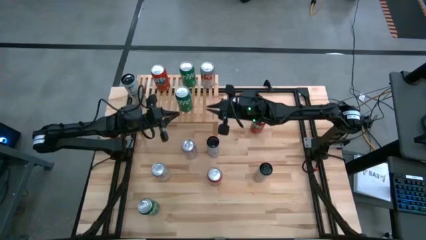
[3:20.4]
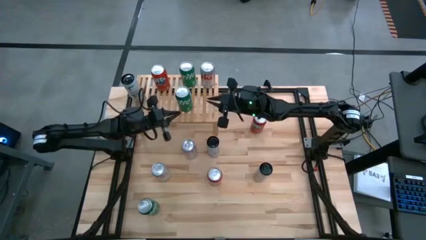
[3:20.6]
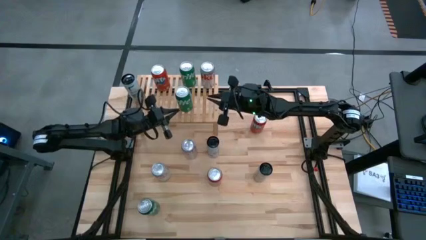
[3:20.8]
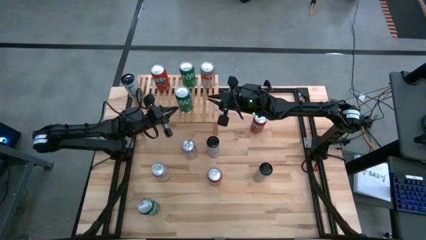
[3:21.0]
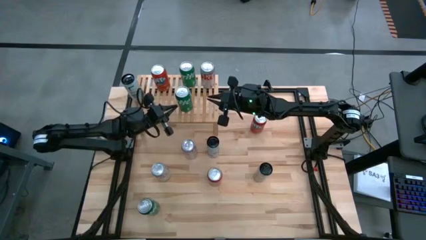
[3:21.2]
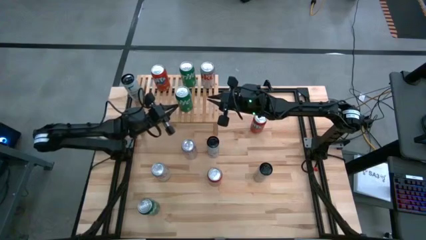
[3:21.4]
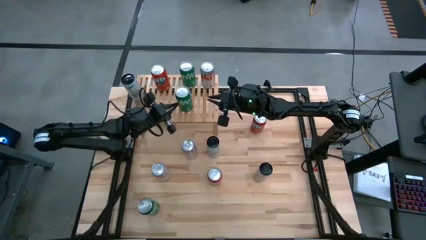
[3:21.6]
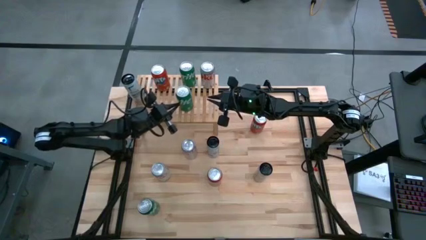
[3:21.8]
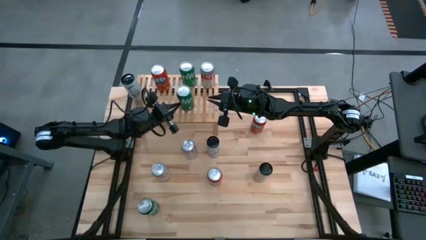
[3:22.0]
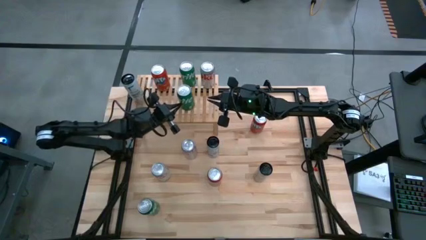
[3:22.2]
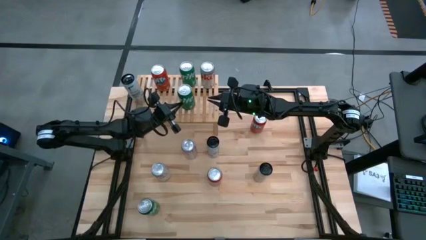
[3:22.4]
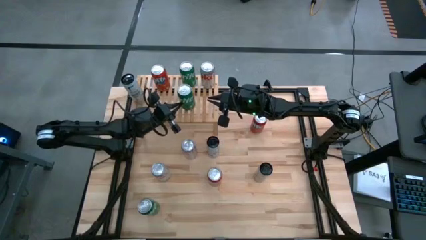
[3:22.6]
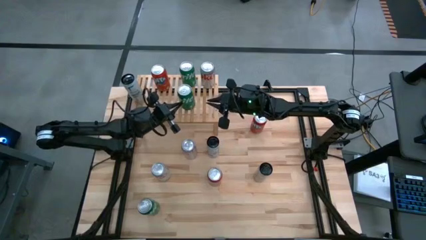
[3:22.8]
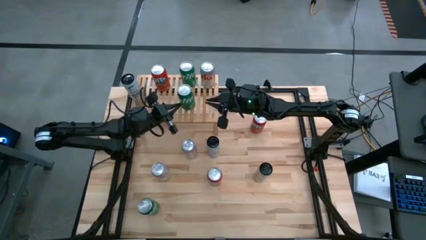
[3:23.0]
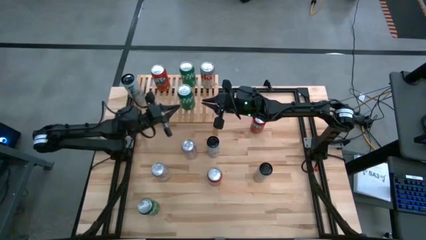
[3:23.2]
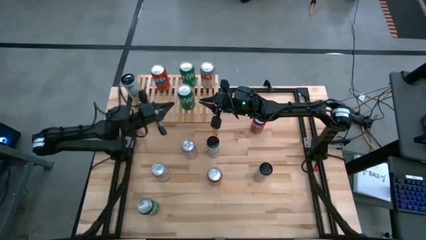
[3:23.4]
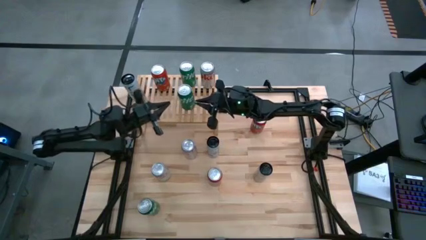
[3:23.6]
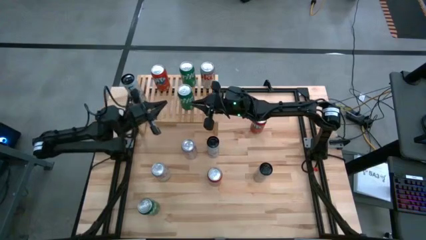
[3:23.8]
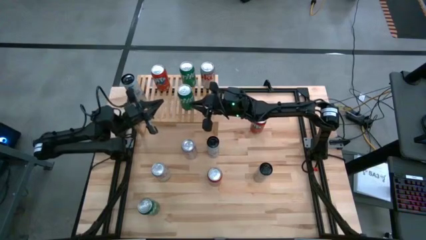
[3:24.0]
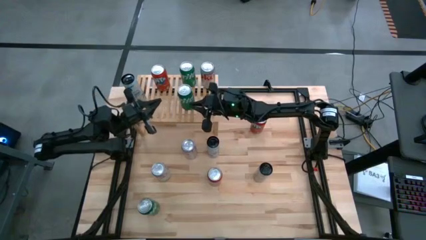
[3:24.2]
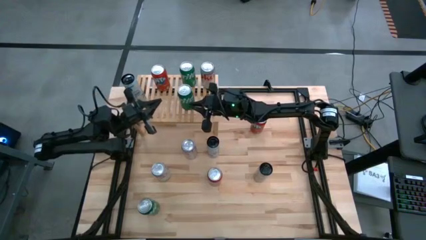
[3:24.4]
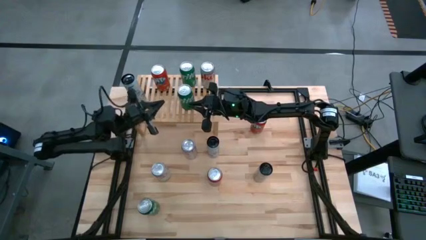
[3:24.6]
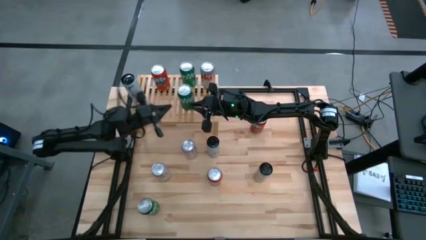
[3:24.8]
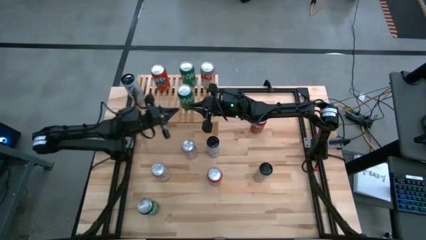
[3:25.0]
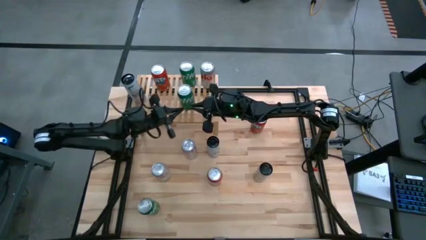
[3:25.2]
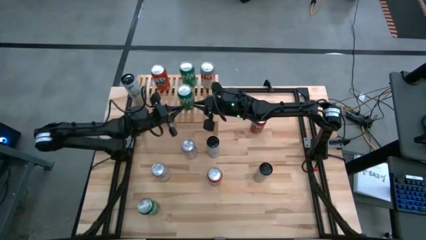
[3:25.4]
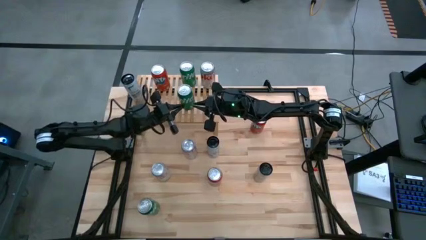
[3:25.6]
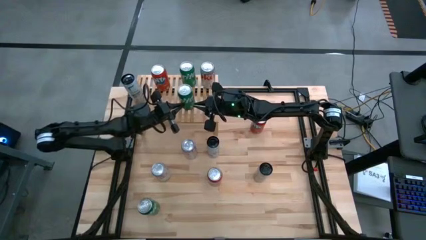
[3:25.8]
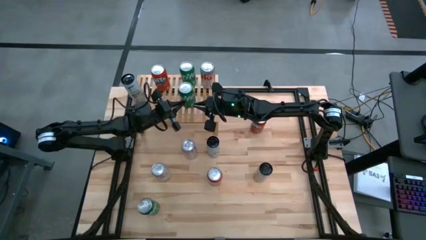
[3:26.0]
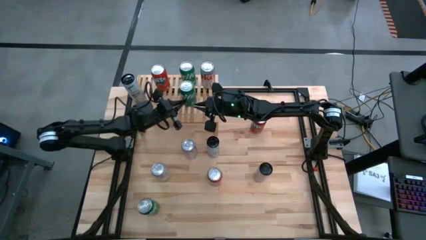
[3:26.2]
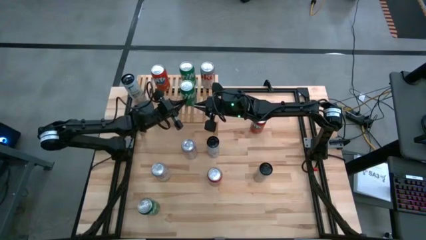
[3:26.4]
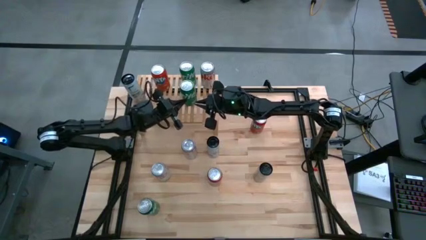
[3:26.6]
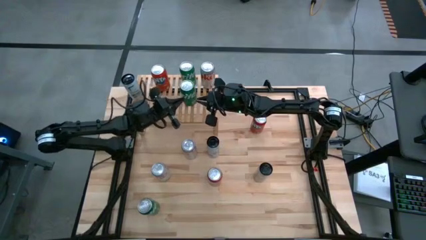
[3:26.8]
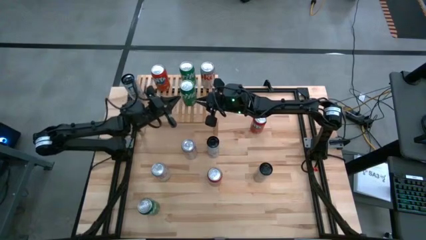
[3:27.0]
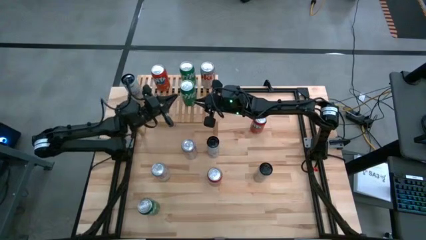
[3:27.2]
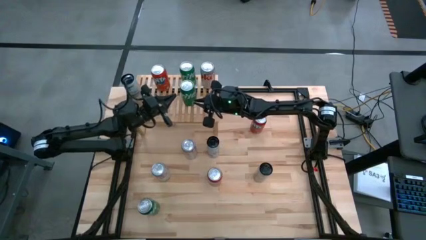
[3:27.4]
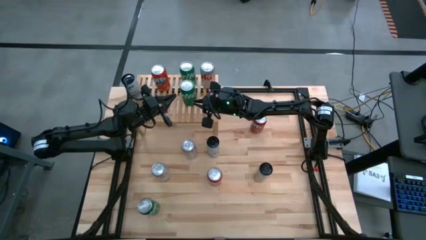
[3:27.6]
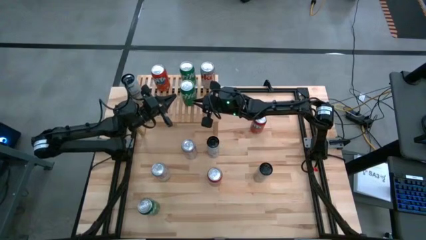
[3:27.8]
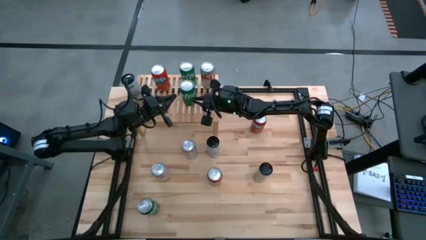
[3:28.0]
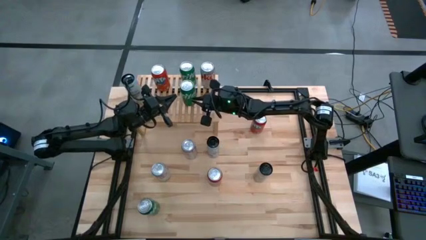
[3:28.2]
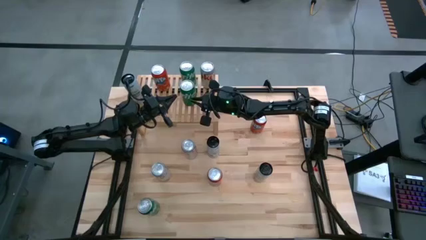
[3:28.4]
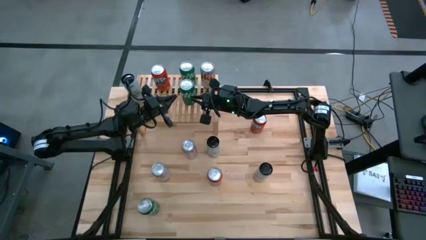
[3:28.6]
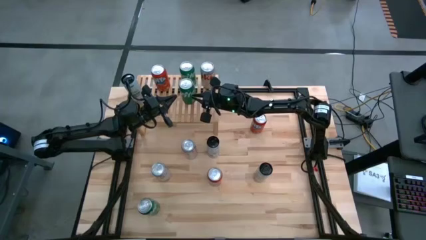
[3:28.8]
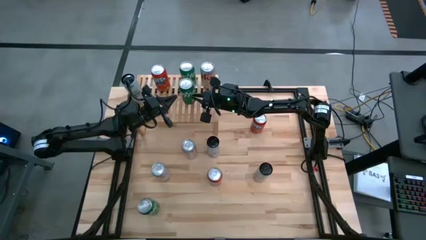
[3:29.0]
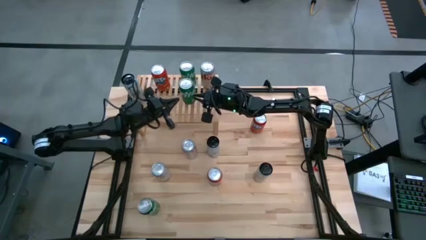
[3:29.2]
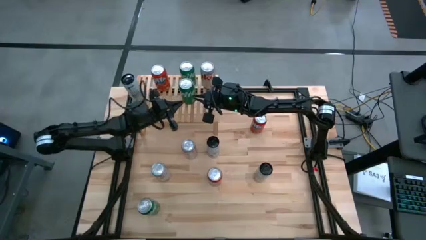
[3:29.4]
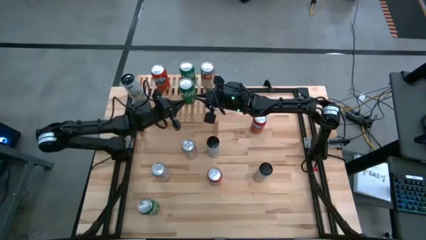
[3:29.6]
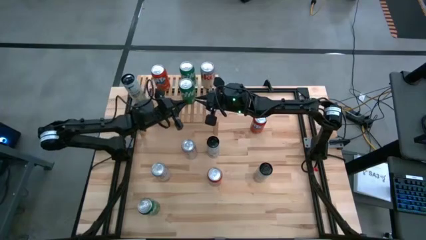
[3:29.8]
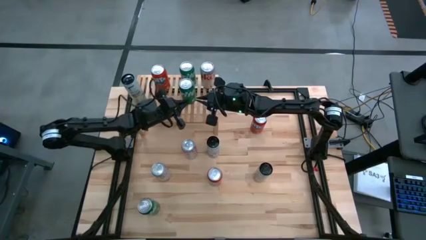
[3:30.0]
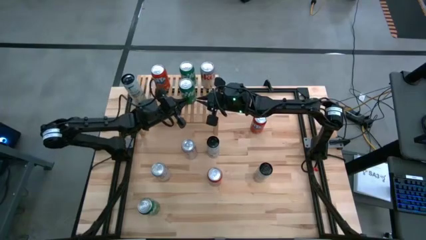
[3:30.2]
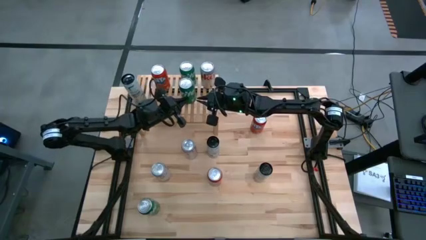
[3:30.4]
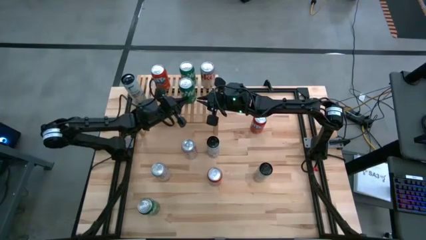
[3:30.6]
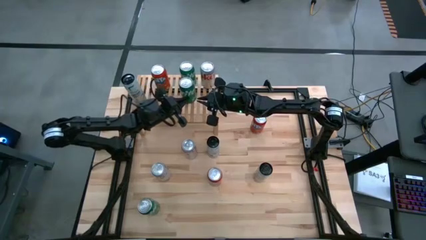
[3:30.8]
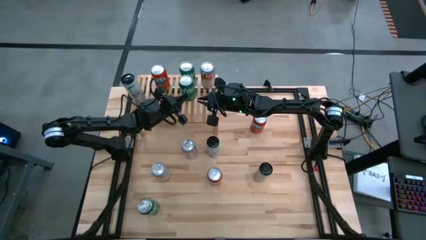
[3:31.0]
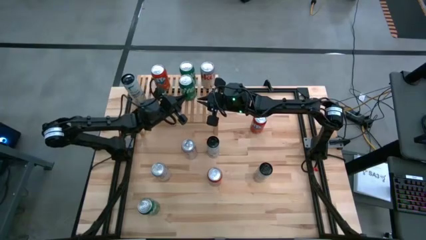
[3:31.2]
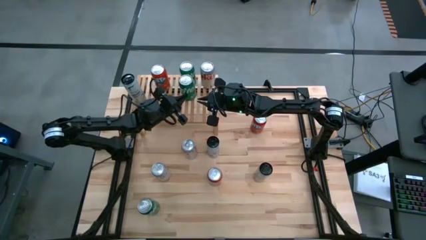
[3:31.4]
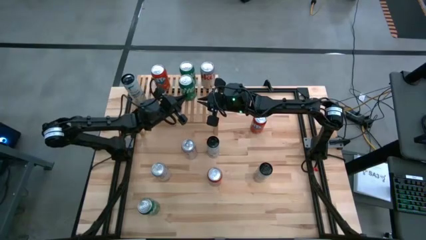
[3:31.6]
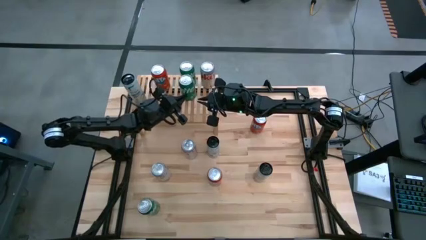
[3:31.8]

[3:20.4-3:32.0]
Task: Place canned beverage on shelf
Put the right green soda can on the shelf aligned with the other green soda can

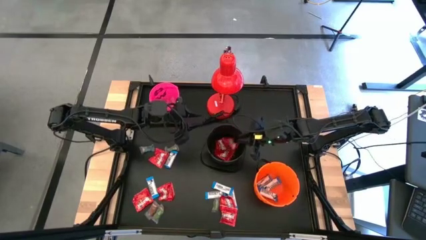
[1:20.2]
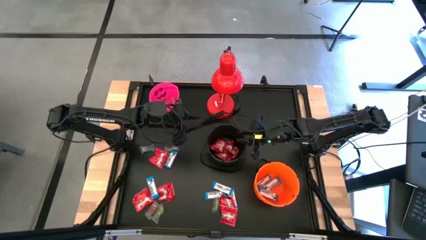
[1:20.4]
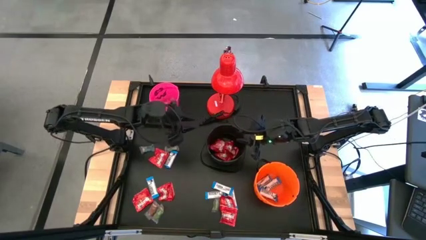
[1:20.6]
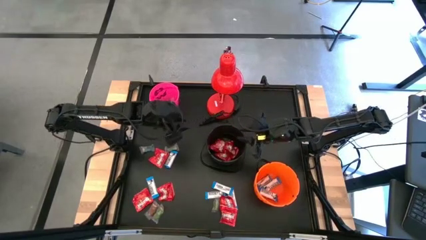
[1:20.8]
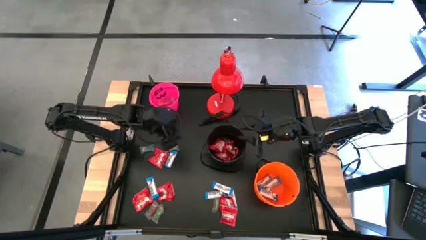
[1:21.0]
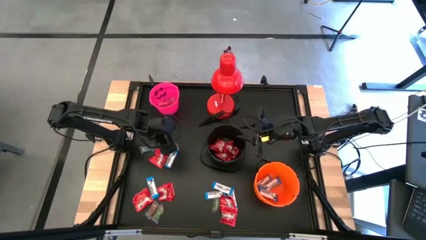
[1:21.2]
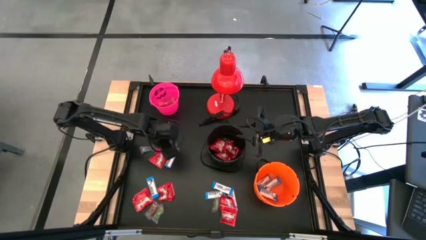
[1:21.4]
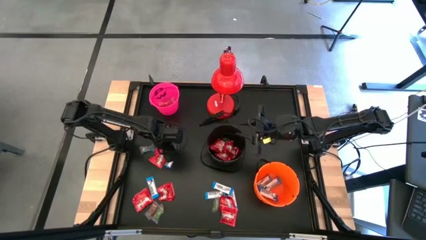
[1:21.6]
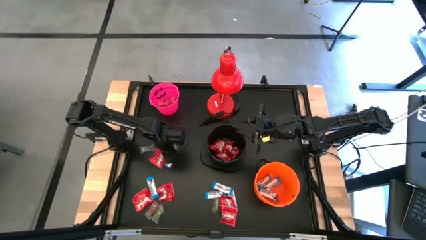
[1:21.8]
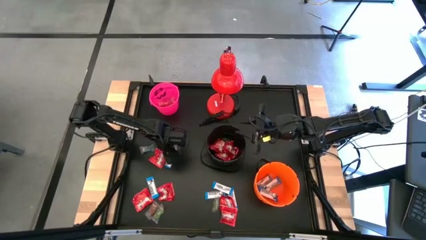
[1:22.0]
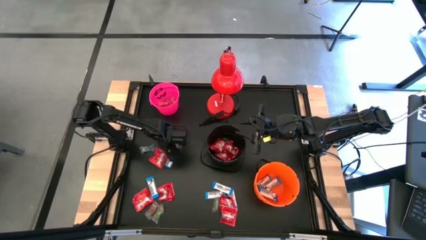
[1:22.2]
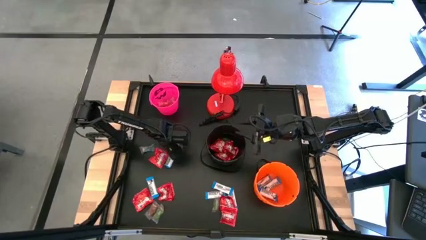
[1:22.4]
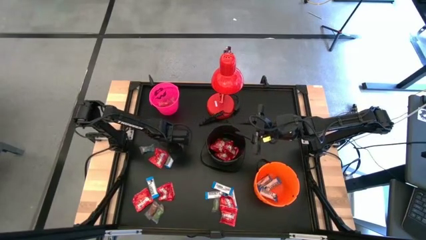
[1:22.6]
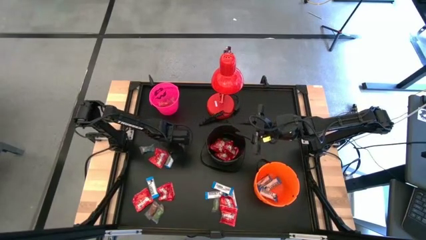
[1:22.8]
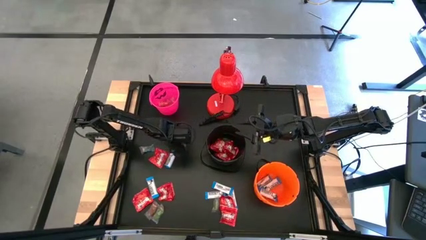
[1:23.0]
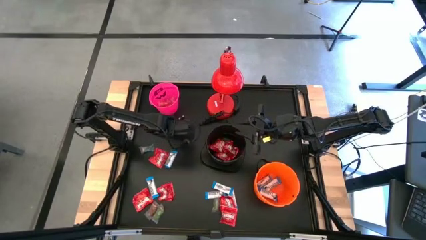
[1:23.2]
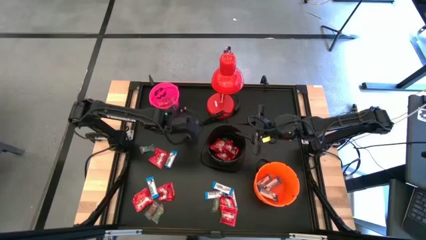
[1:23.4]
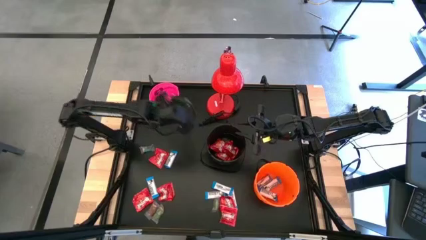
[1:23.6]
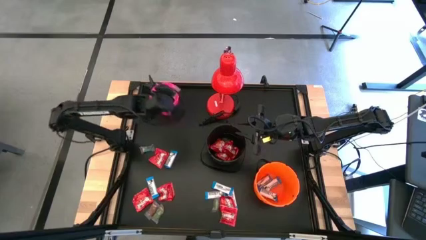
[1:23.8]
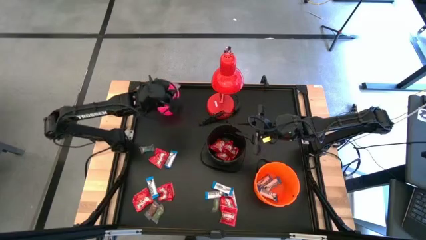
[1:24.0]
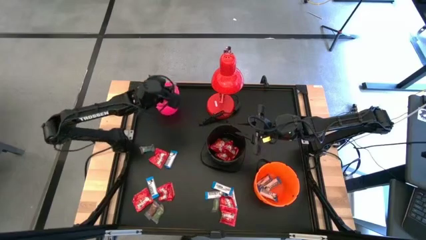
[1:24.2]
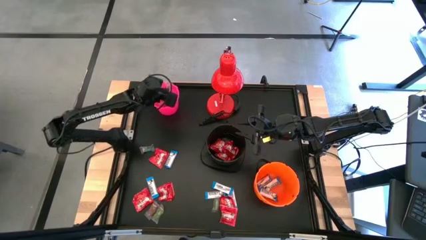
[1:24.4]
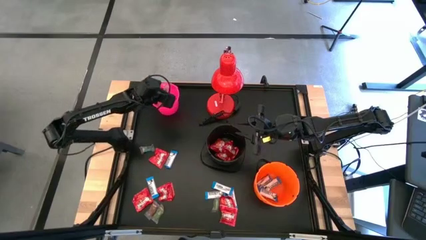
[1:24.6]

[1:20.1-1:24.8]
Task: Organize candy in baskets
Put the green gummy into the pink bucket
